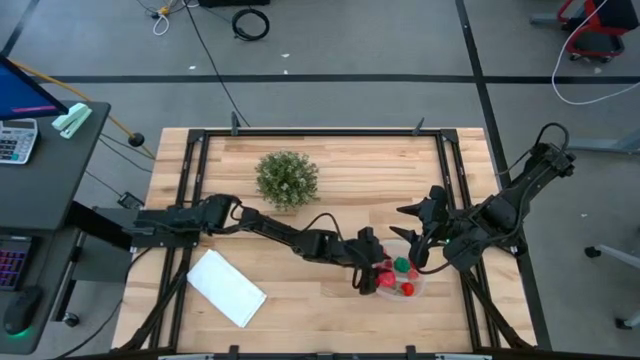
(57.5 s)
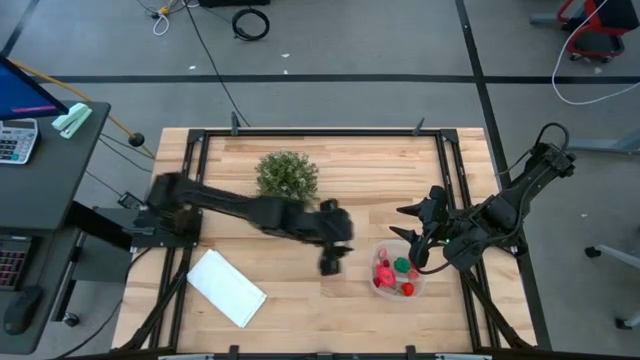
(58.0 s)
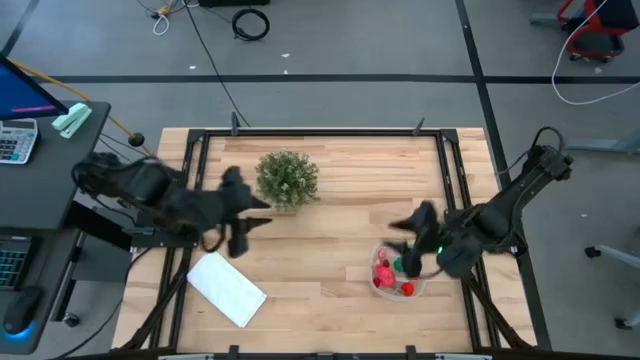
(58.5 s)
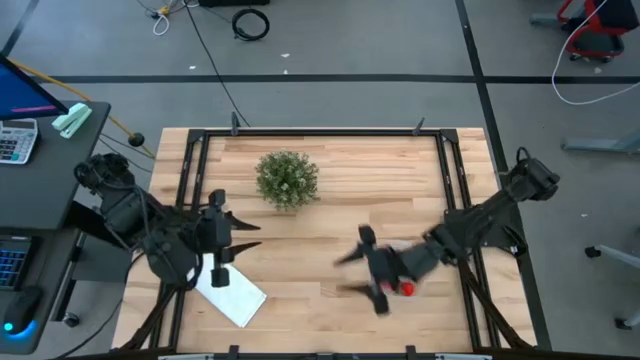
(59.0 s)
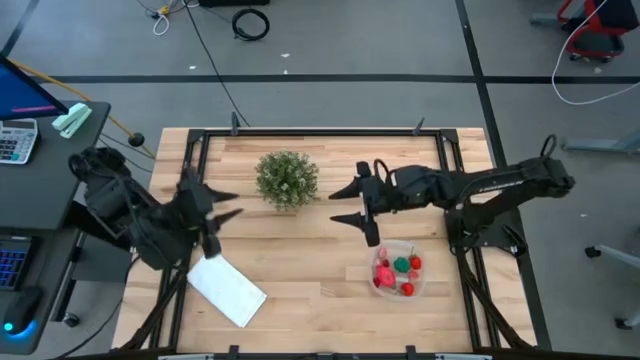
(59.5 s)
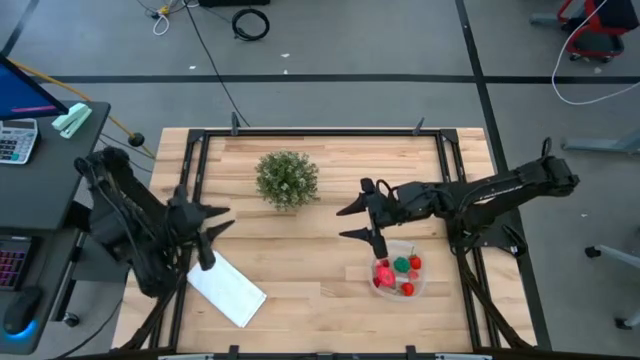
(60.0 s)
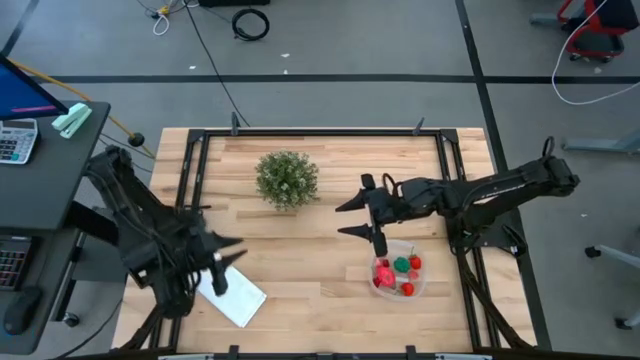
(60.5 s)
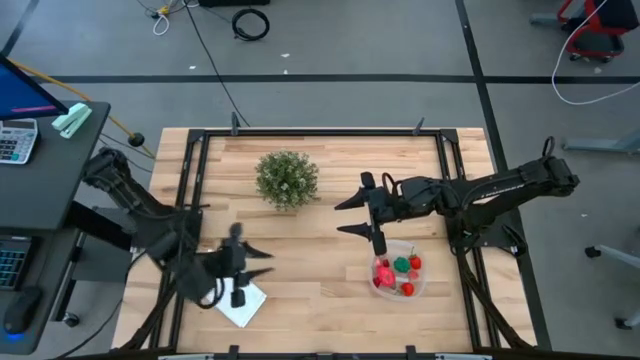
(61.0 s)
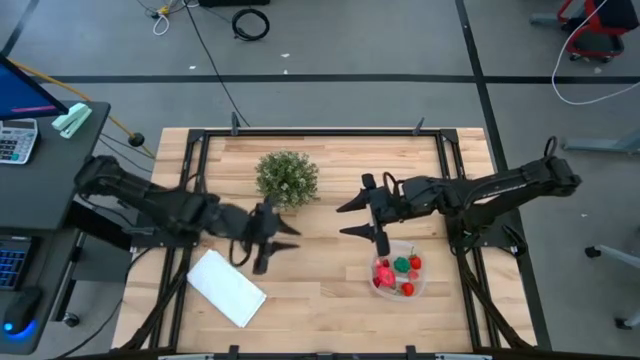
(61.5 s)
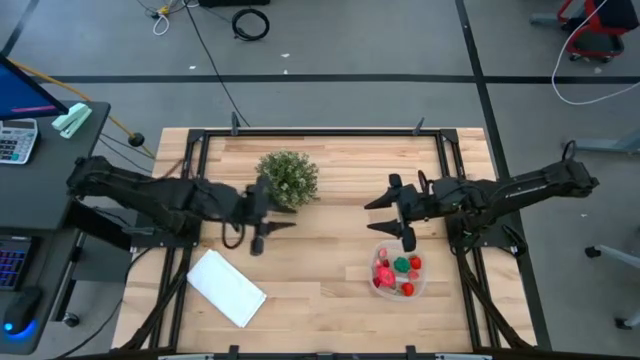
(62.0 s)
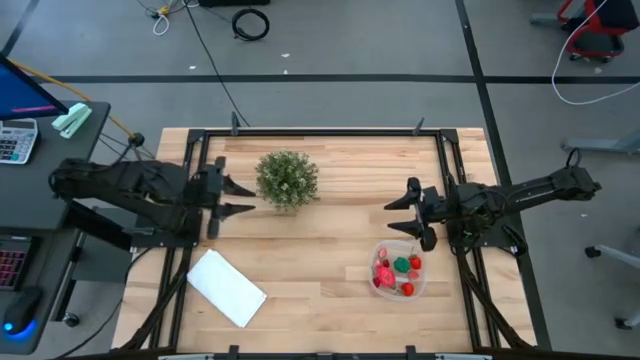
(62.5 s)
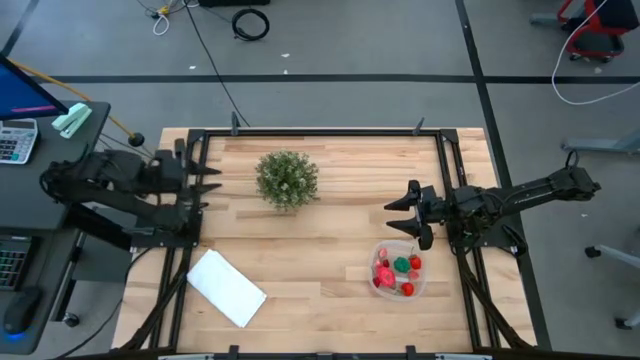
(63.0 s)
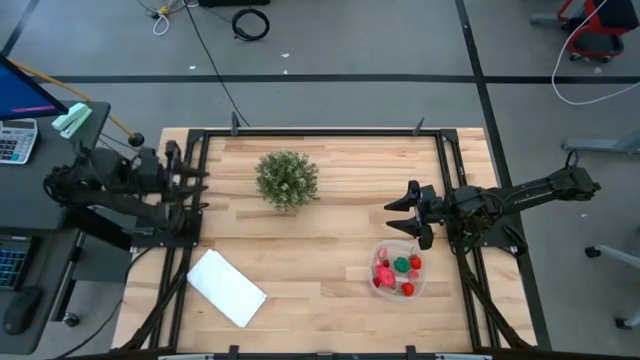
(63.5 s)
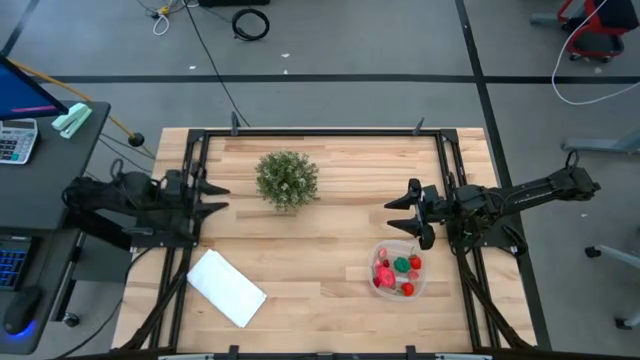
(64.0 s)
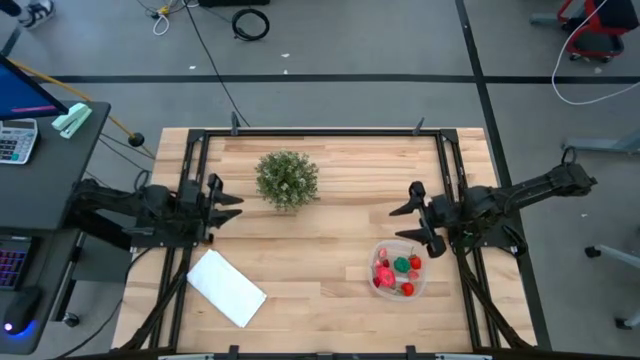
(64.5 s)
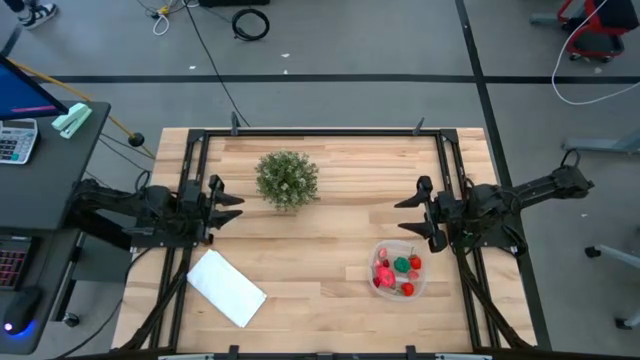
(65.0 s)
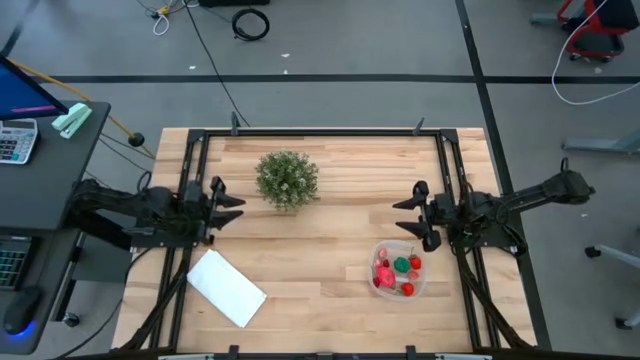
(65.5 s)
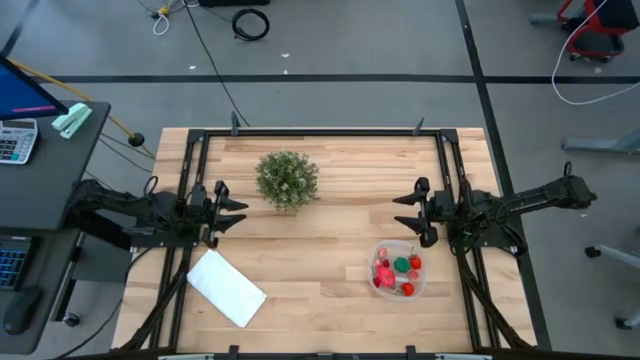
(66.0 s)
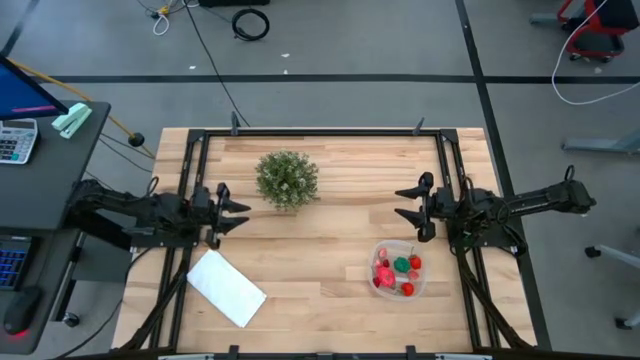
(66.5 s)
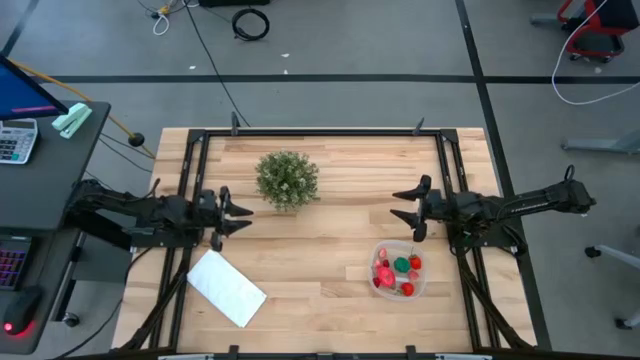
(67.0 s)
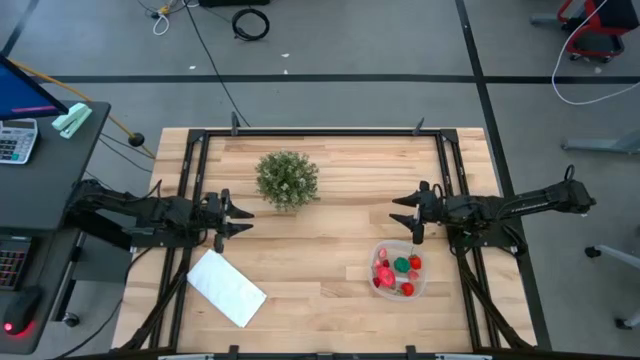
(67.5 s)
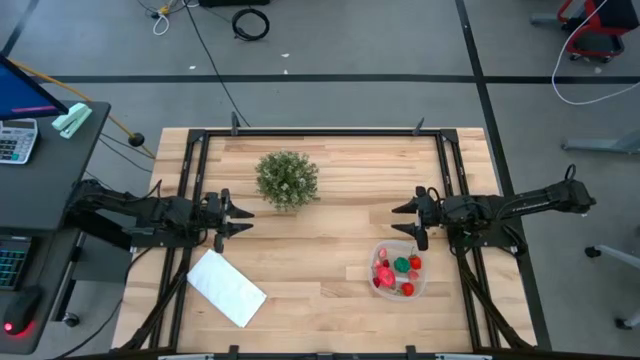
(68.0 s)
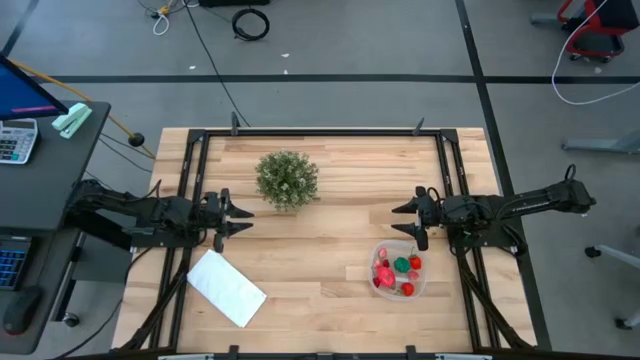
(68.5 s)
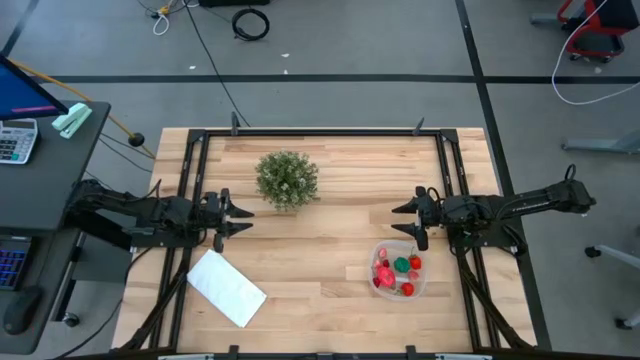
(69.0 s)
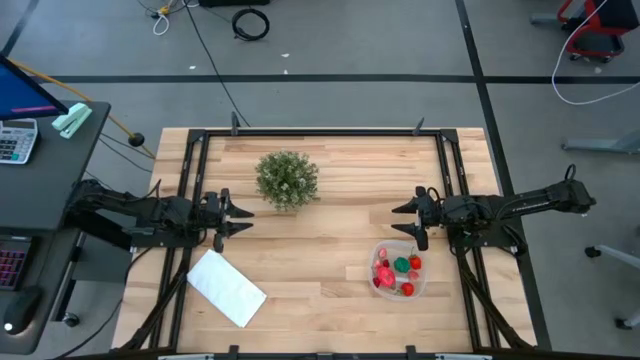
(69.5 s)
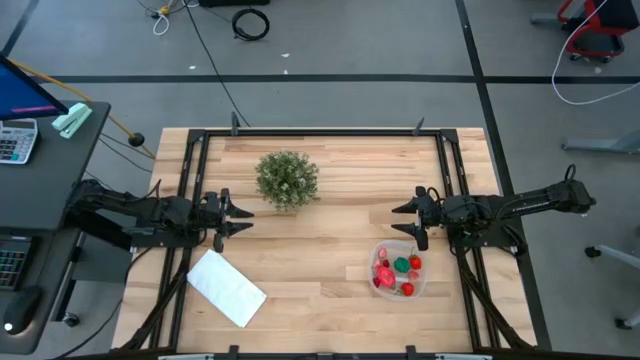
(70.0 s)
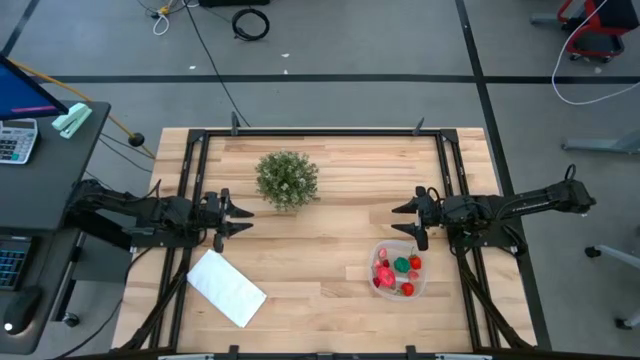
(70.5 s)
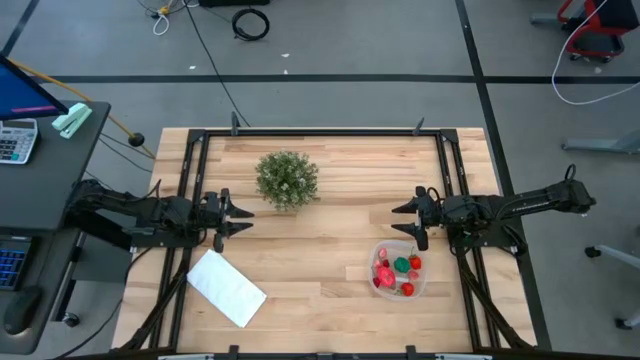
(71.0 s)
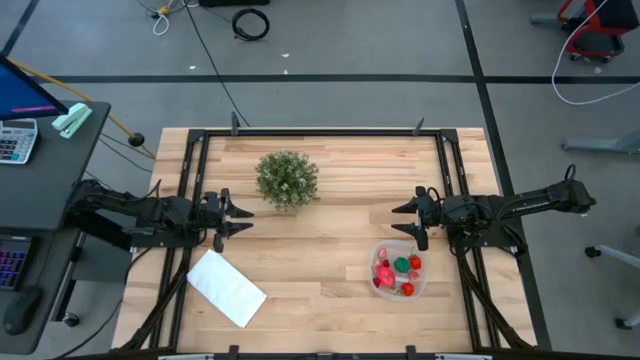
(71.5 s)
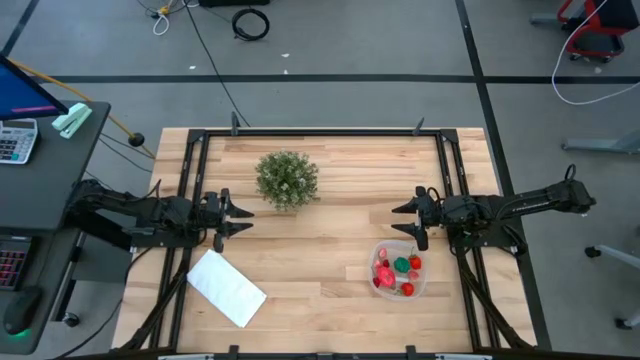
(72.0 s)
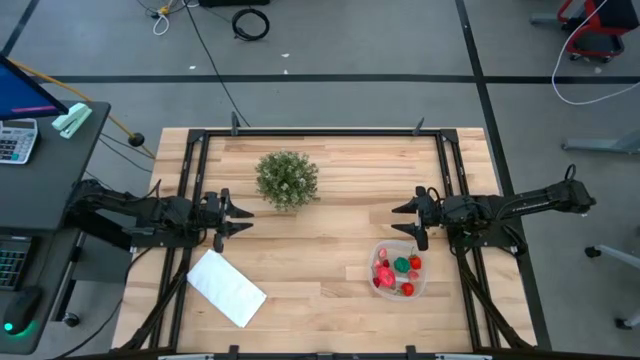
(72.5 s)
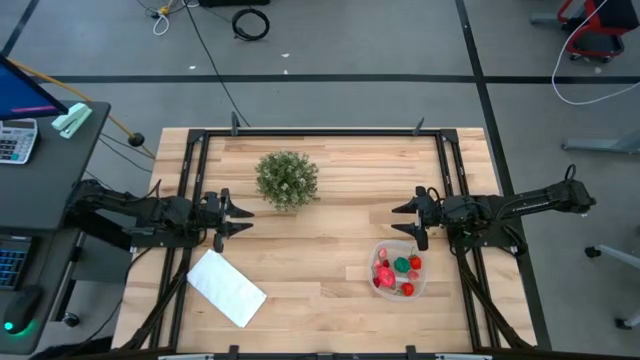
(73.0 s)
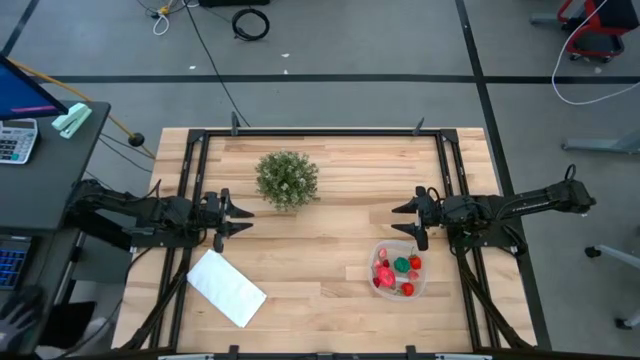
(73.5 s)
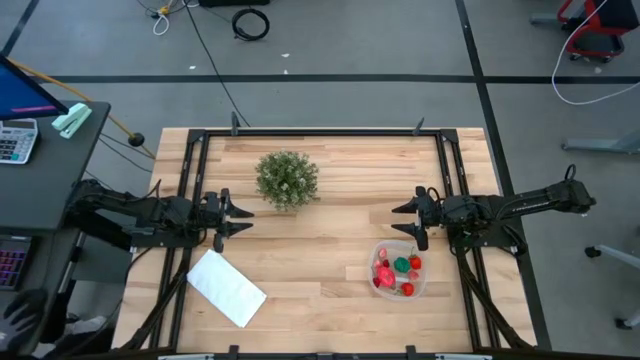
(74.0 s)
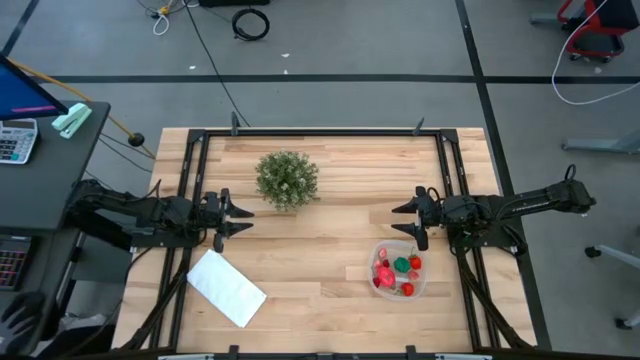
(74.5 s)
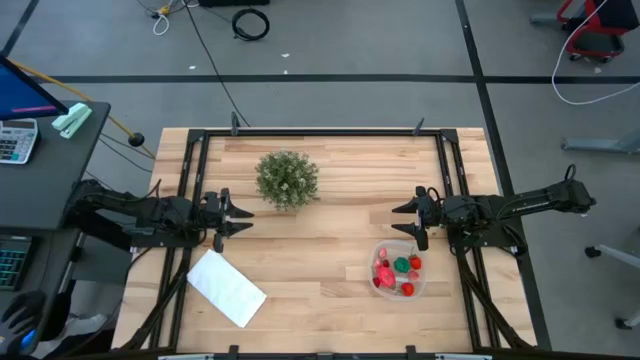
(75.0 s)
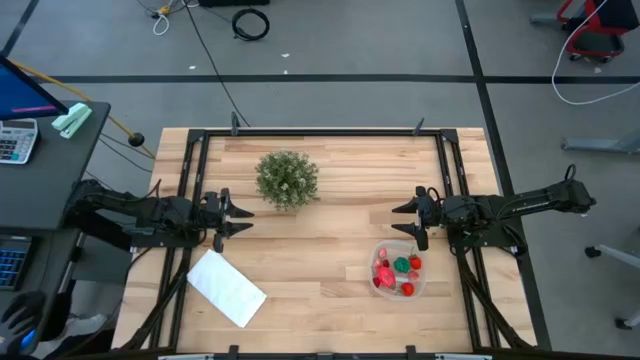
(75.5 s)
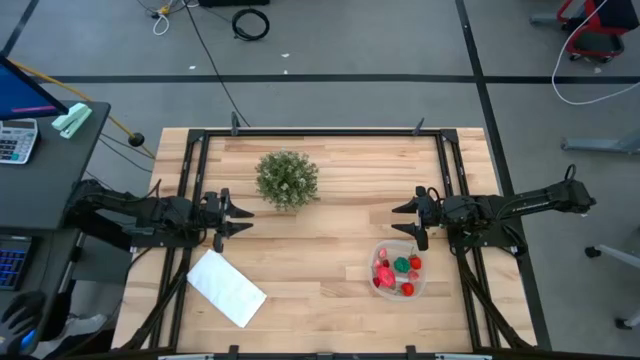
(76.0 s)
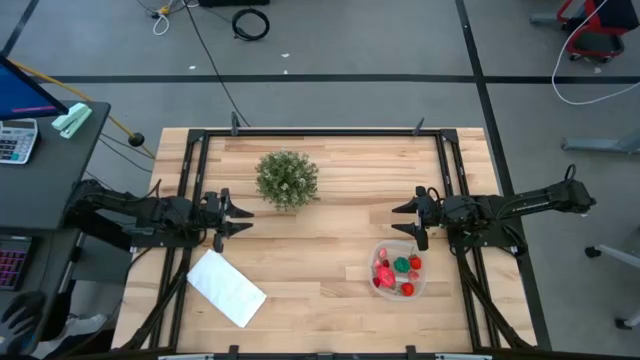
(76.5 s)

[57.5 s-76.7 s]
Task: Pick and placing Produce into tupperware
Return to Home Position

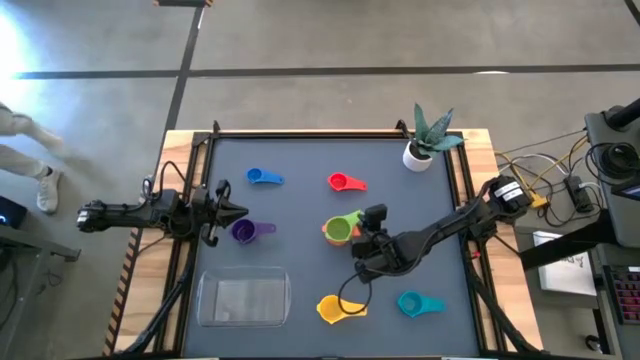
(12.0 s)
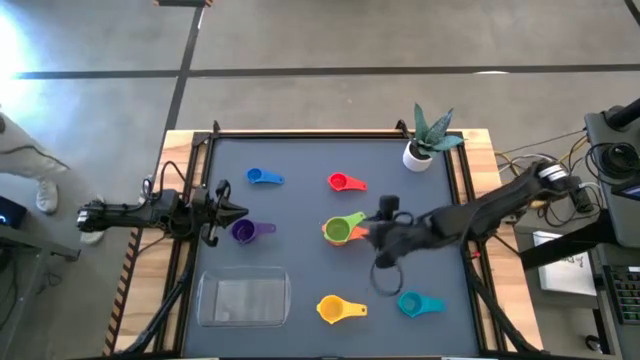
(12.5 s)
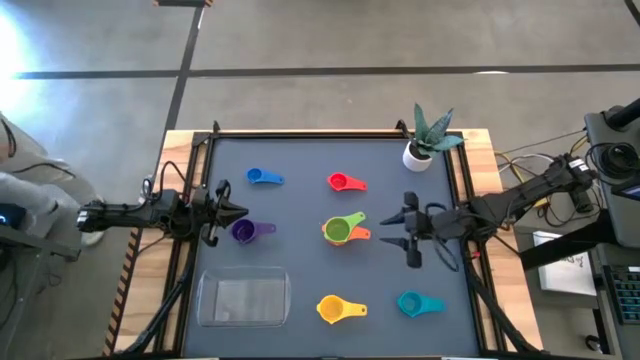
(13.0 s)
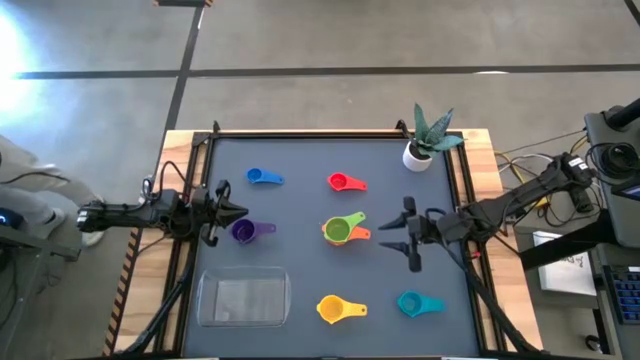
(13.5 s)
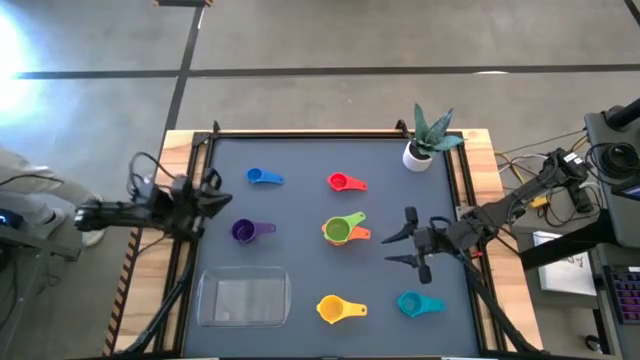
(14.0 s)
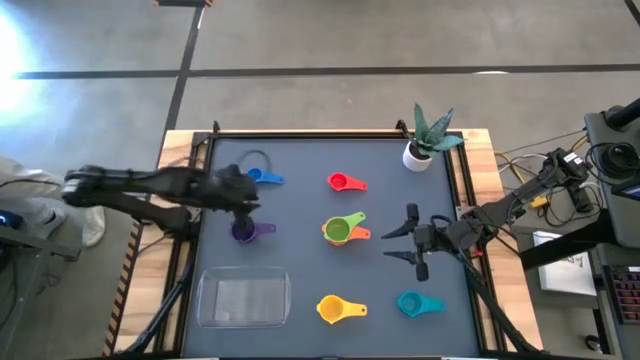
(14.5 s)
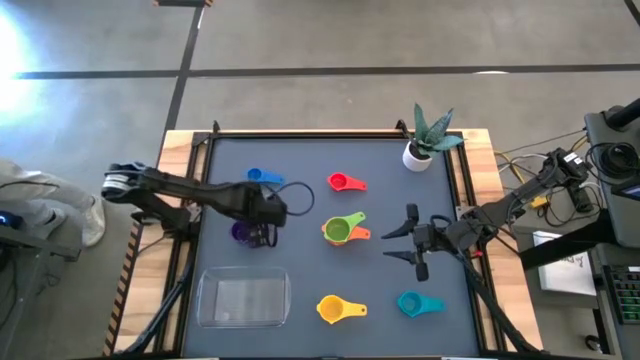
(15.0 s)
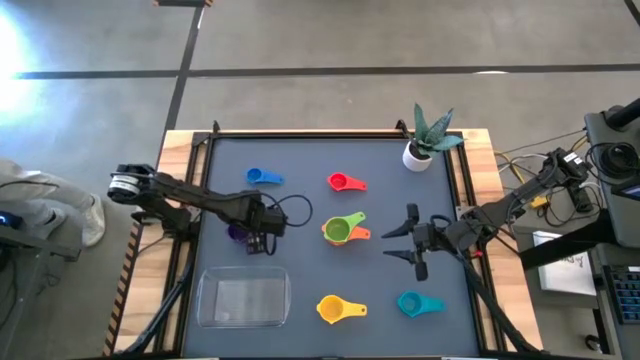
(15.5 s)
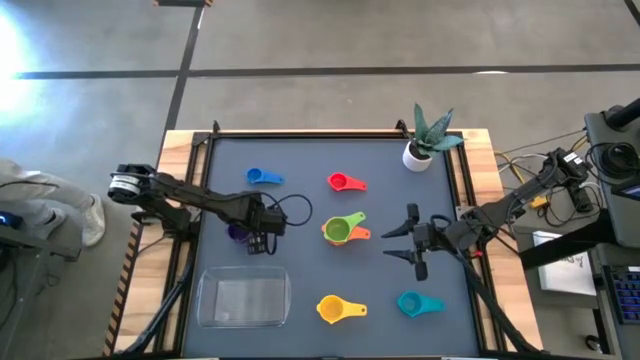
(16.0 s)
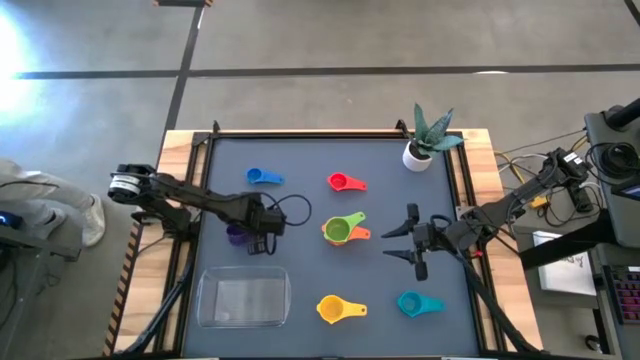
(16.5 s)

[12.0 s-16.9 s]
Task: Nest measuring cups in basket
Stack the violet measuring cup on top of the green measuring cup
